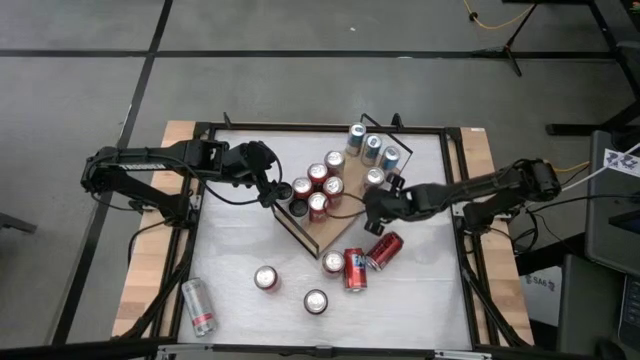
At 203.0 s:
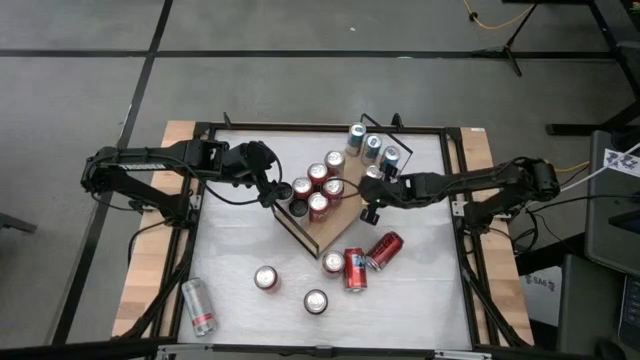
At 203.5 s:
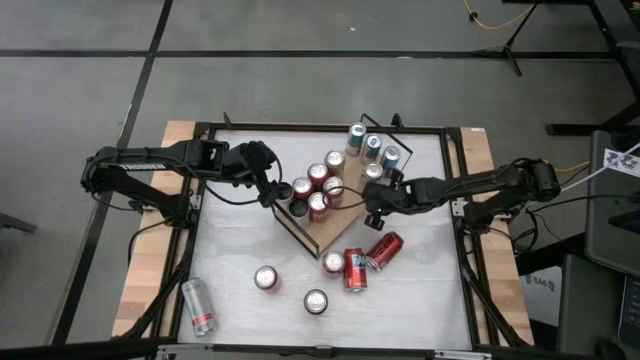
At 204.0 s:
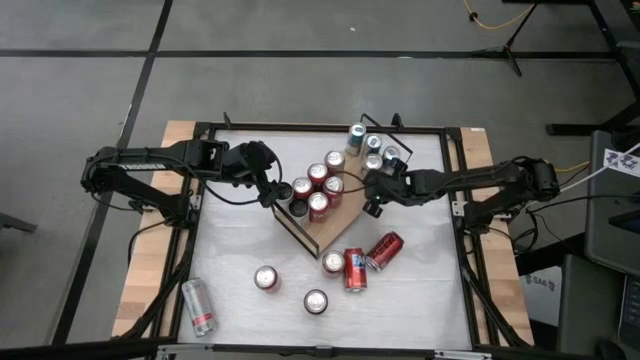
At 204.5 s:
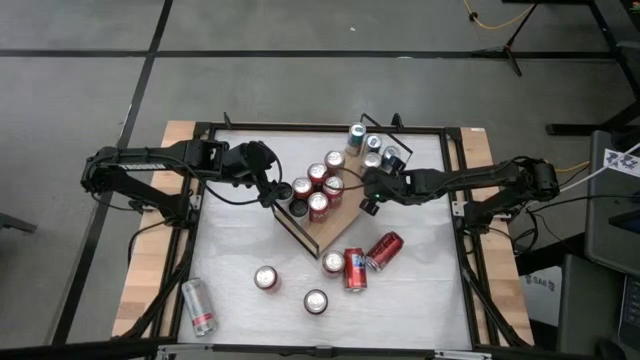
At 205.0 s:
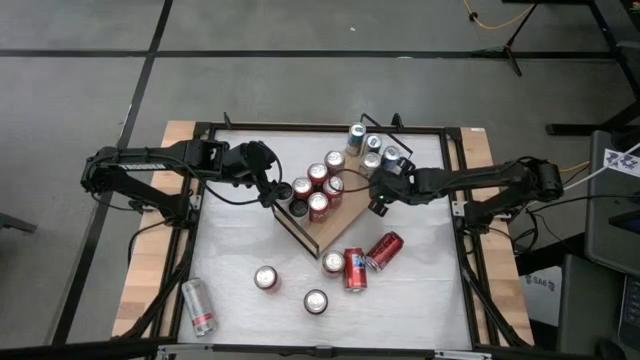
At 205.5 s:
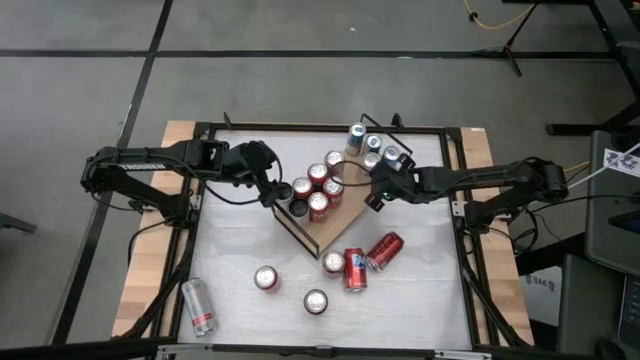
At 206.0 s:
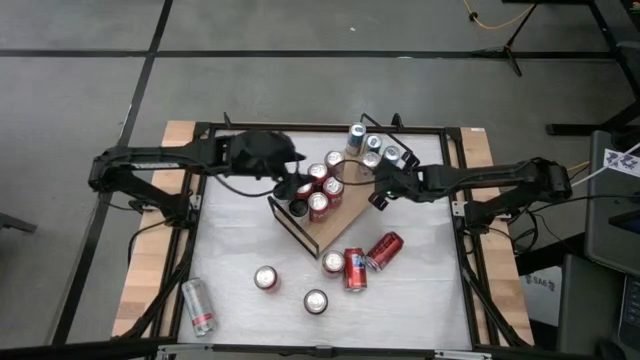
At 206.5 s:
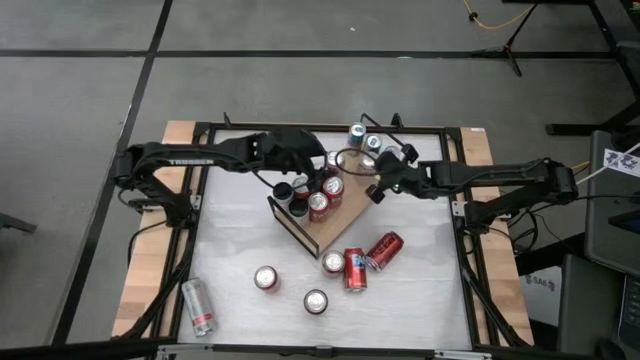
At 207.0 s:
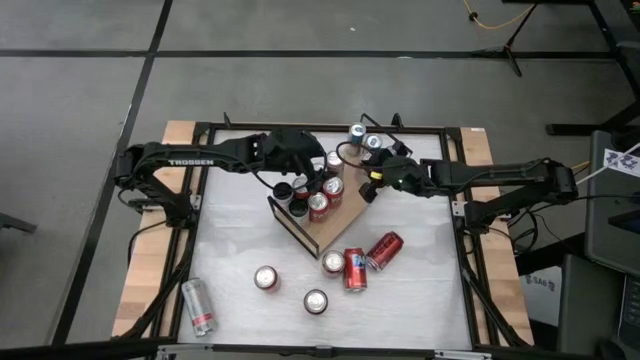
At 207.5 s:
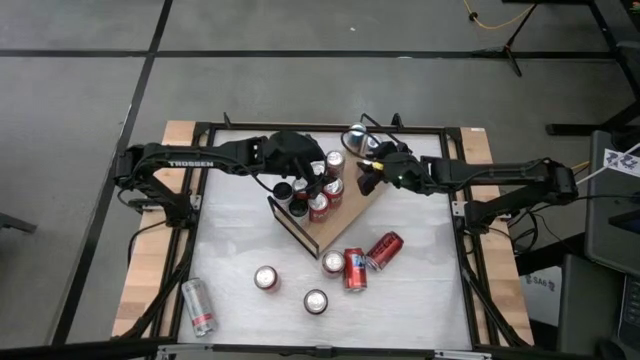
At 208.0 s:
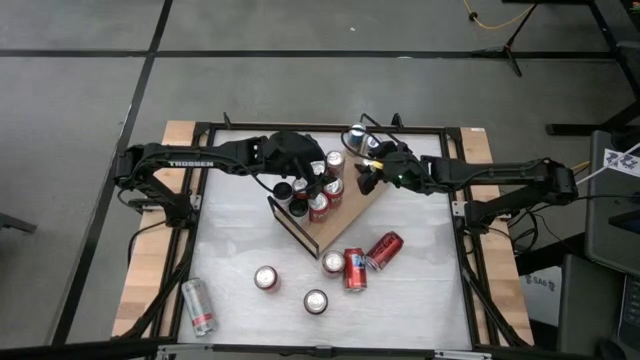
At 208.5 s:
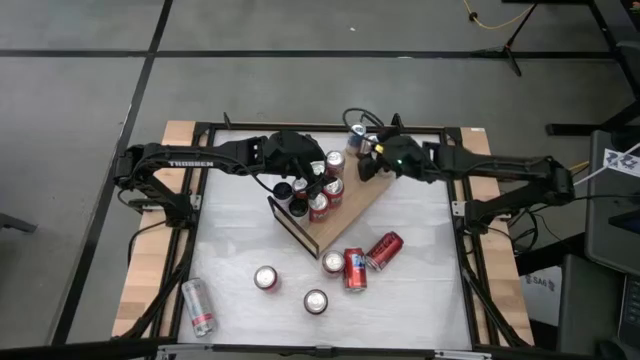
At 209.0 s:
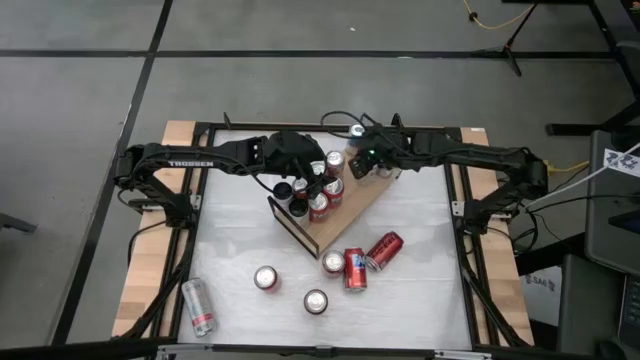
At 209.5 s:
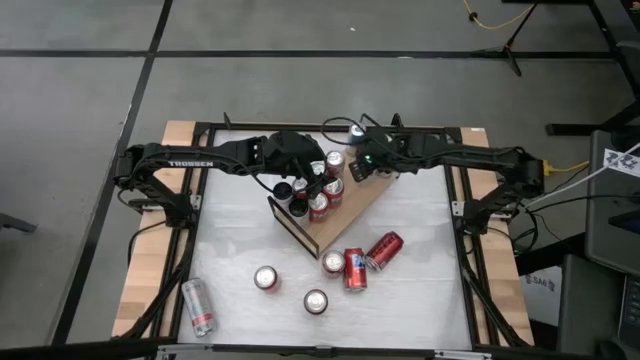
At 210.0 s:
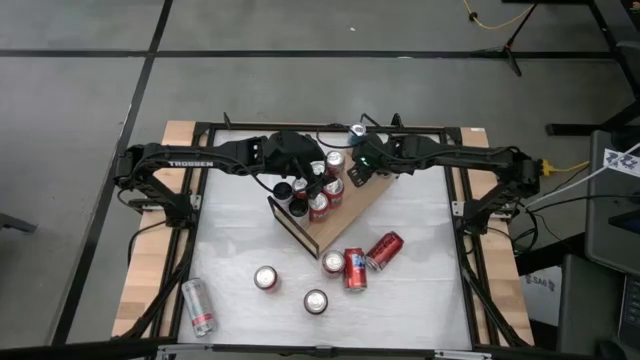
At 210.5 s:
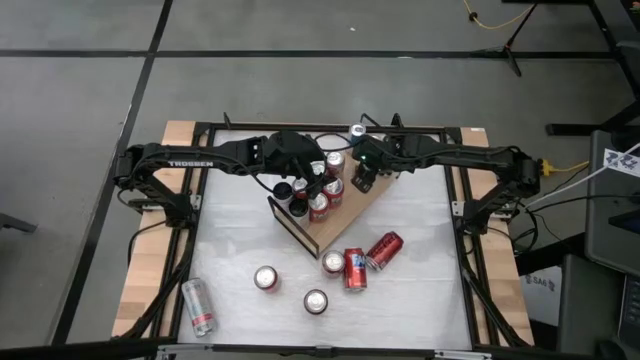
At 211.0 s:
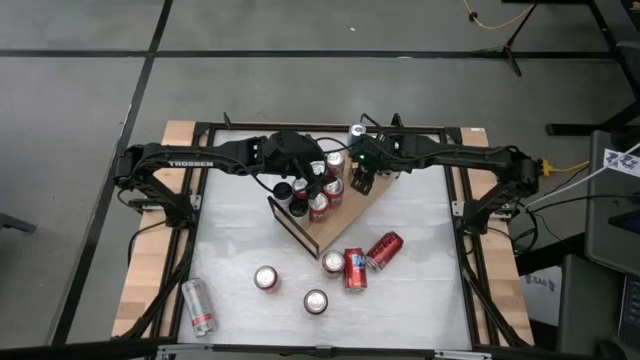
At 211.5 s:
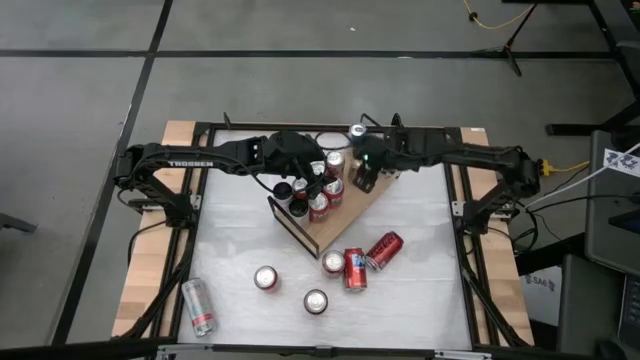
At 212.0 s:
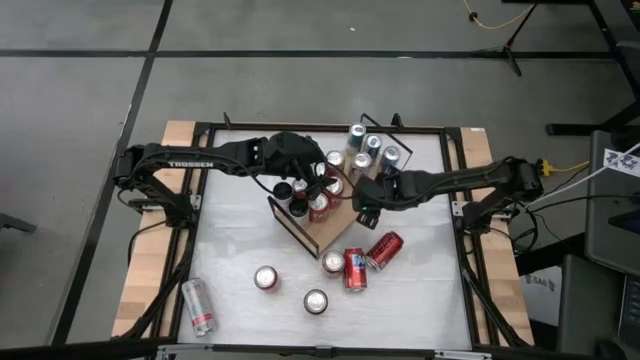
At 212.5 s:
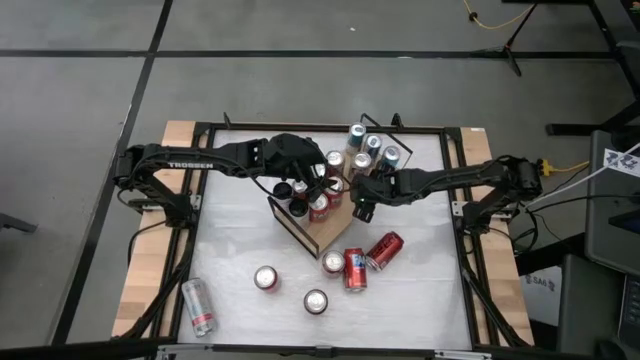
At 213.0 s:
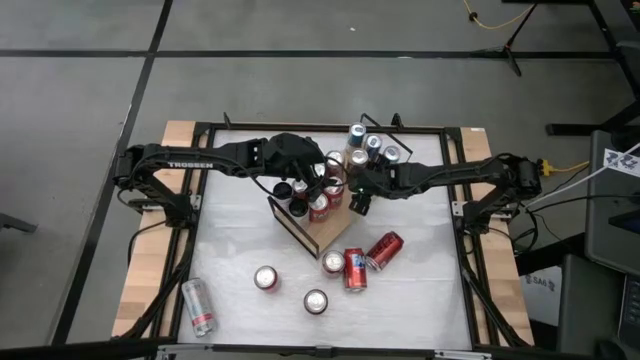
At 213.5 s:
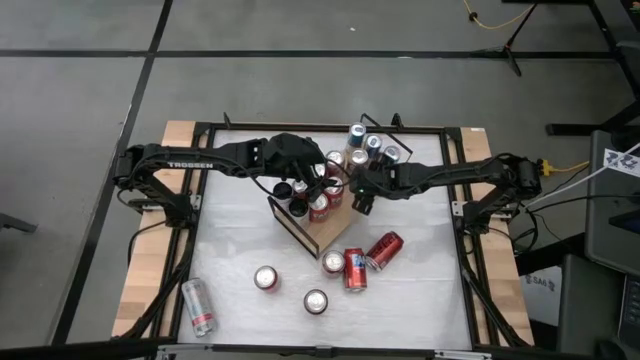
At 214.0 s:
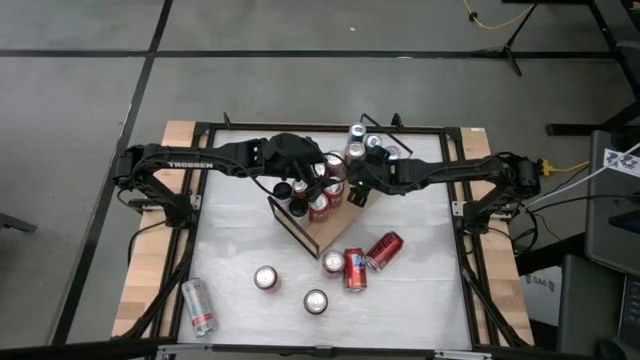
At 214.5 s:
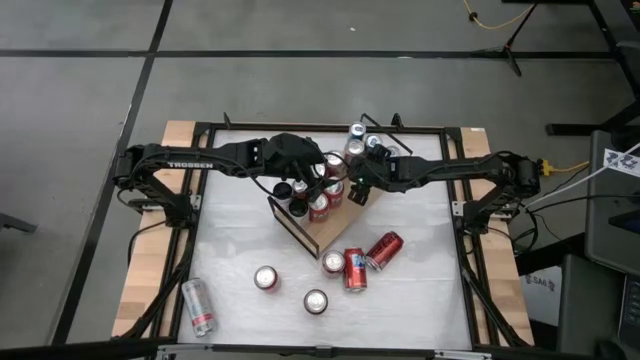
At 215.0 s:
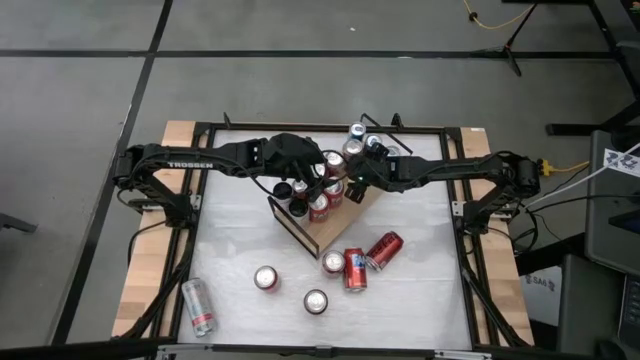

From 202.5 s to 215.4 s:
Task: Place canned beverage on shelf
Put the red silver soda can on the shelf

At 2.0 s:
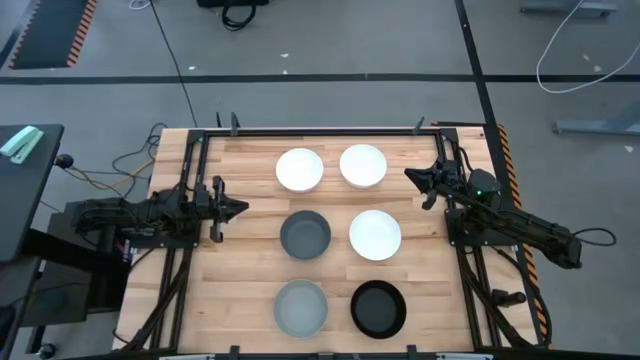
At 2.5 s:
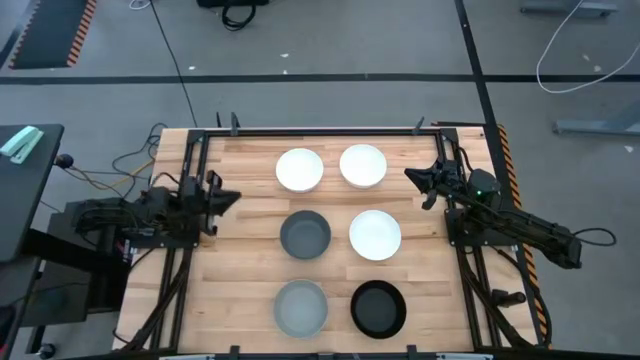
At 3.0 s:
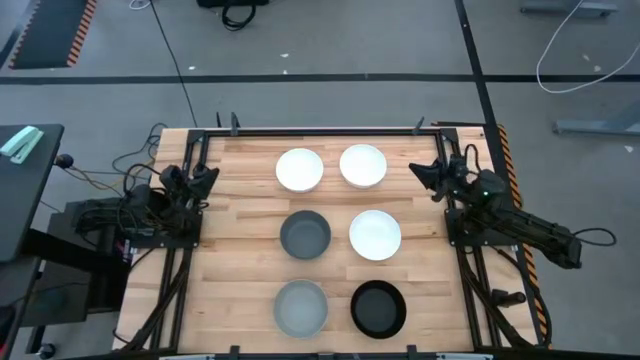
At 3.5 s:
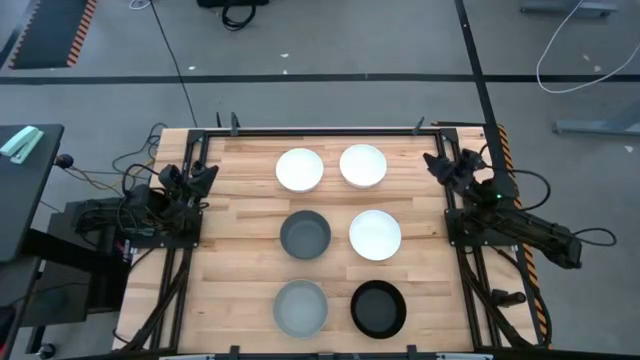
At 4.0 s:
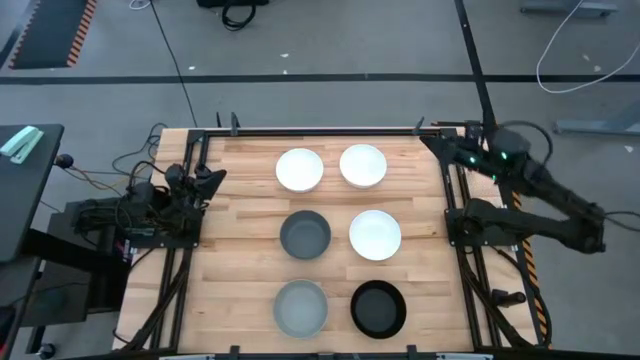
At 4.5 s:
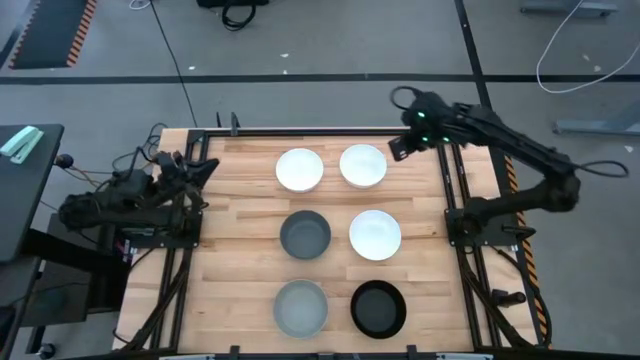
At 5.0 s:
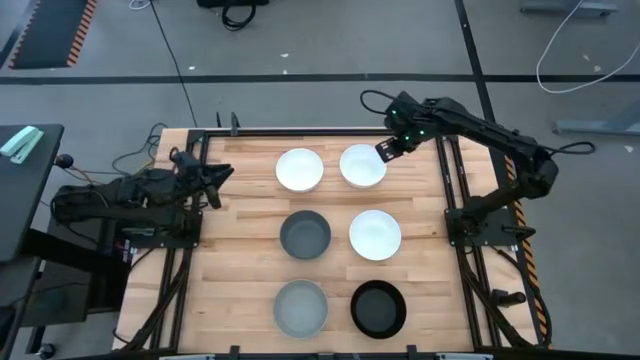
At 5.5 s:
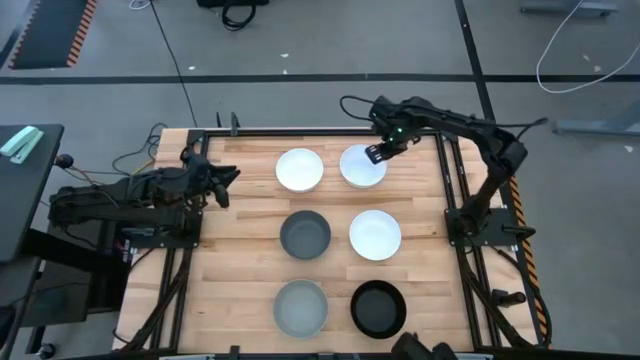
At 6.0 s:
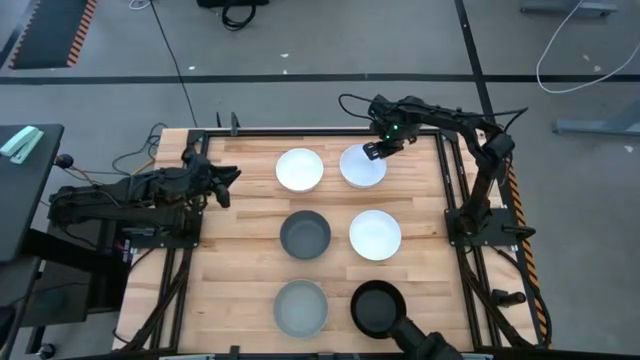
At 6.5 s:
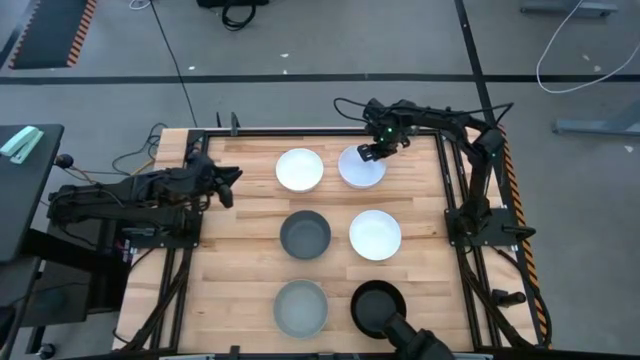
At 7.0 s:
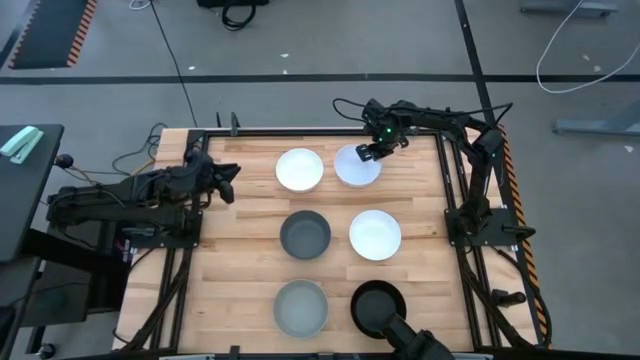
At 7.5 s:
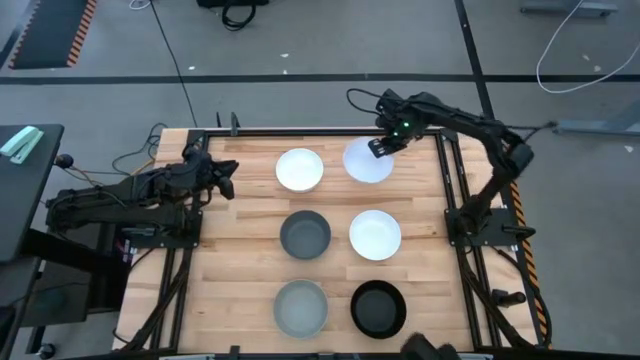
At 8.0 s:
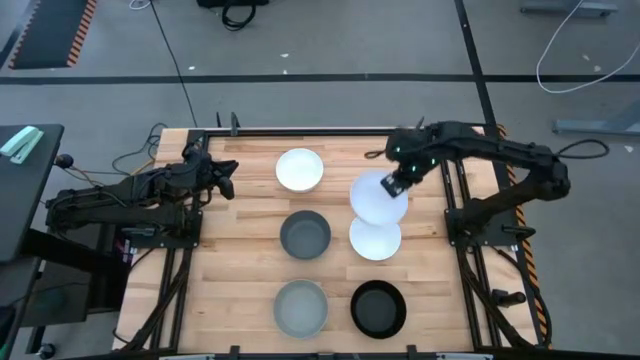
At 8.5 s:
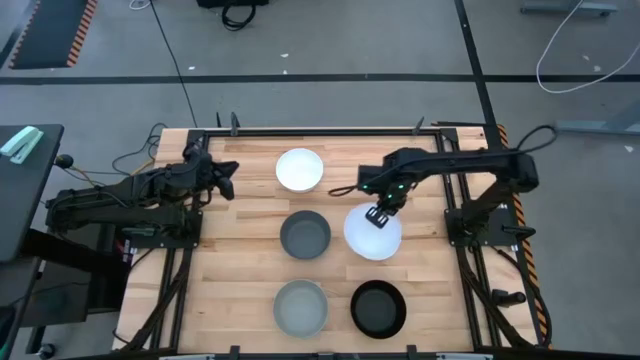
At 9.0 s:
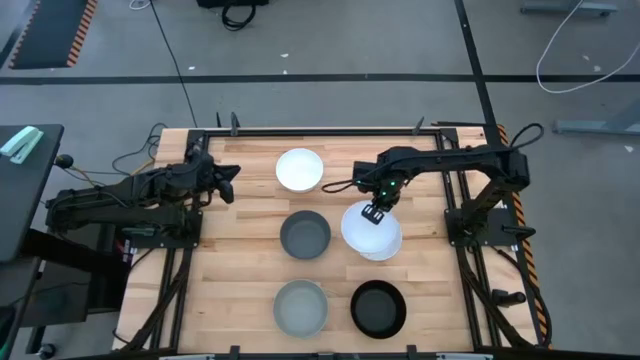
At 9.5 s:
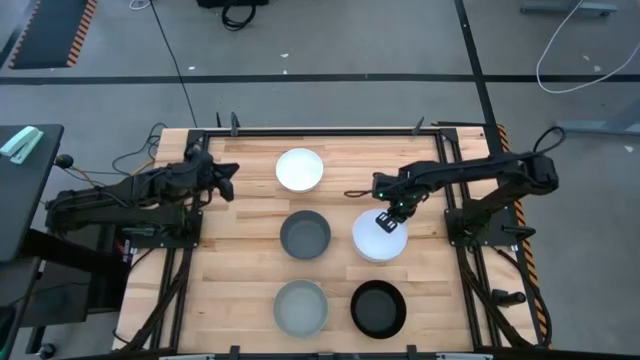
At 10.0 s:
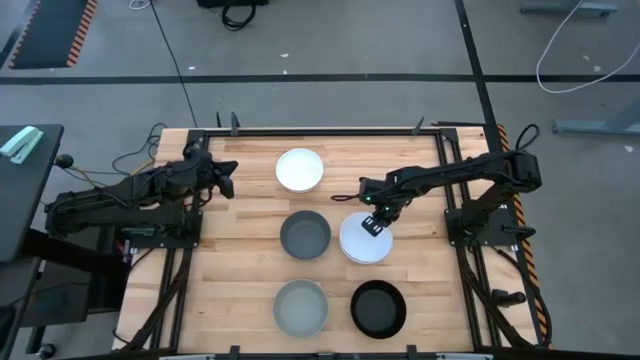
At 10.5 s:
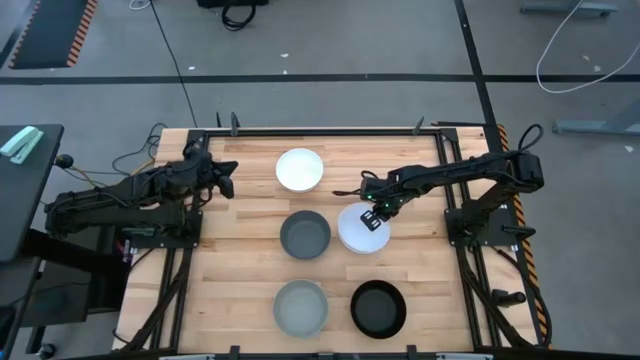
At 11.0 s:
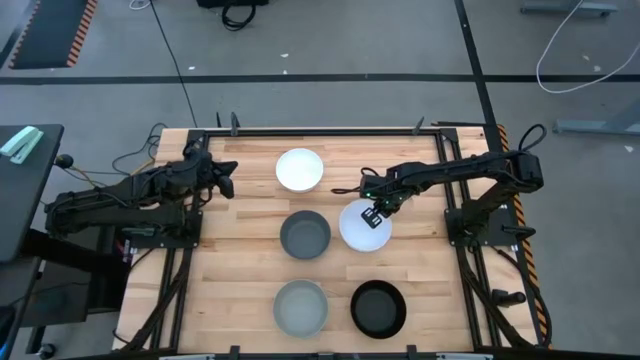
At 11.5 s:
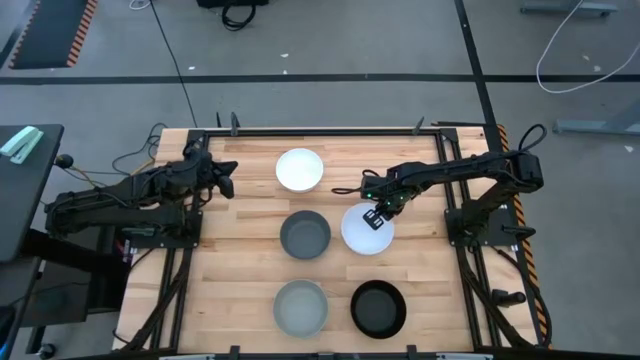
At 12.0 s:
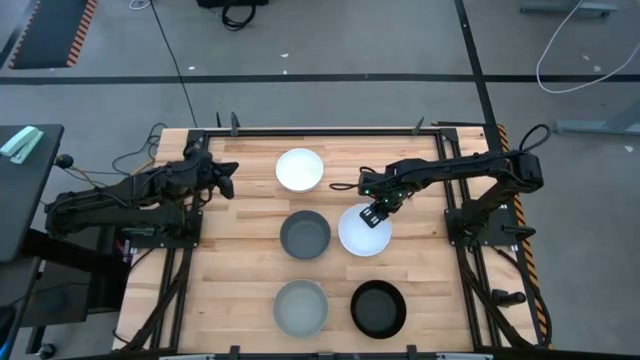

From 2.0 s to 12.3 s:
Task: Nest bowls inside each other
Stack the top right white bowl on the bottom white bowl
